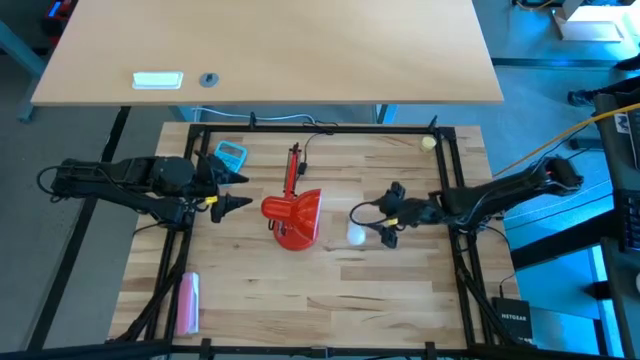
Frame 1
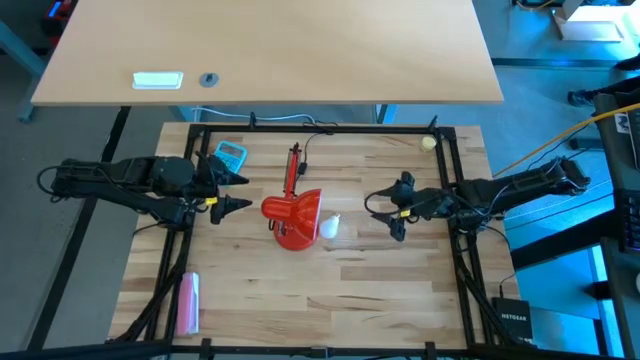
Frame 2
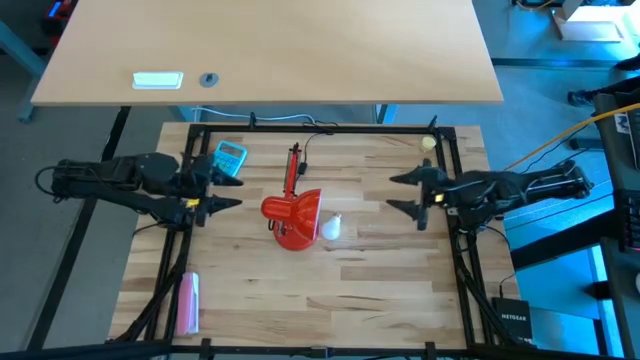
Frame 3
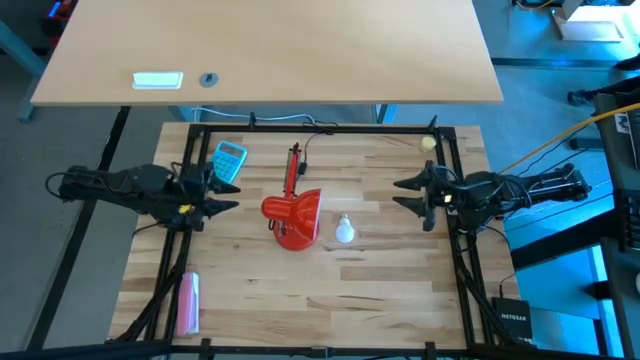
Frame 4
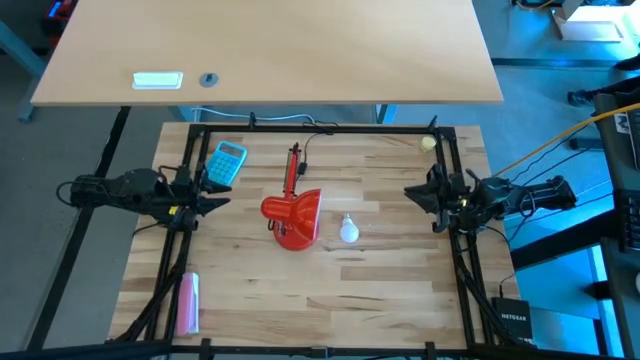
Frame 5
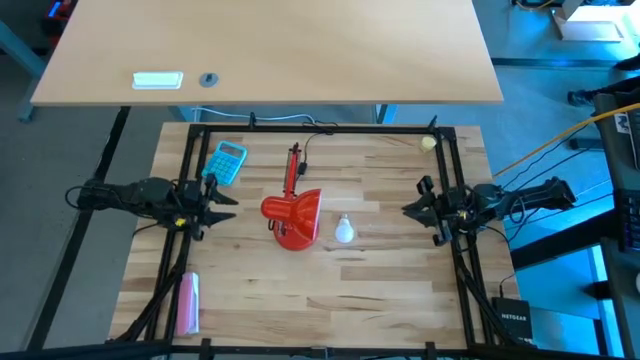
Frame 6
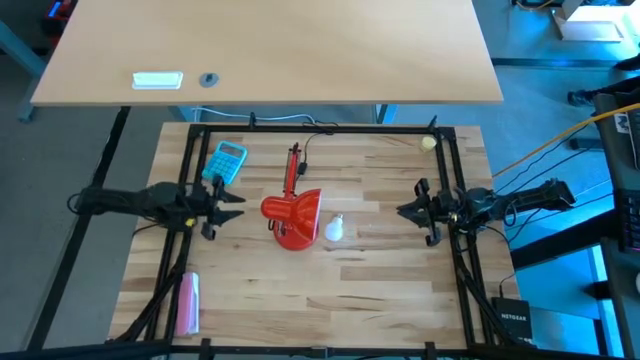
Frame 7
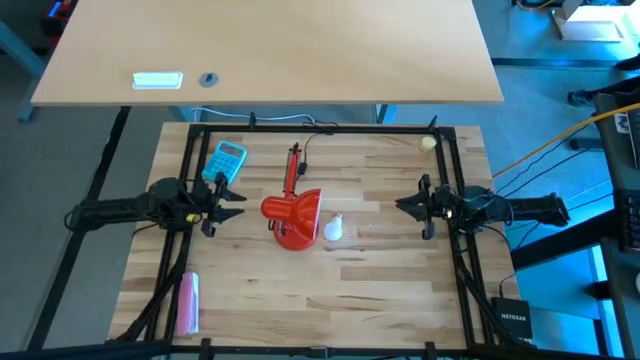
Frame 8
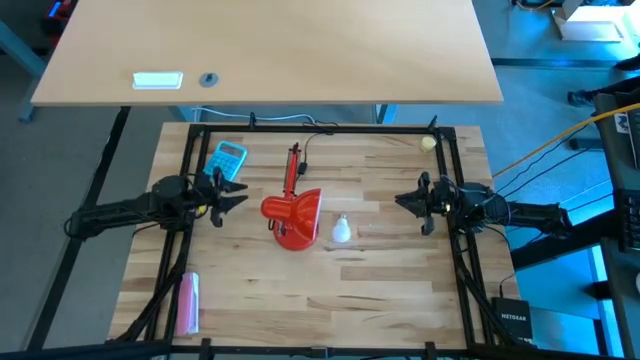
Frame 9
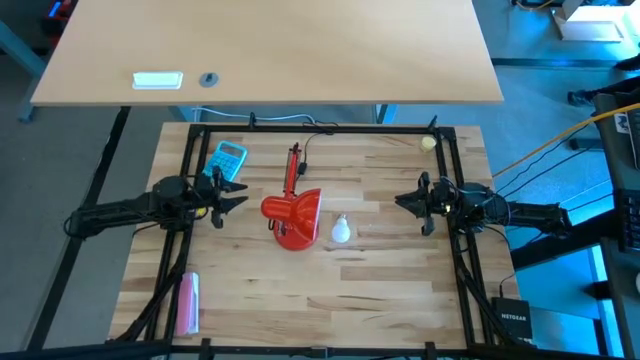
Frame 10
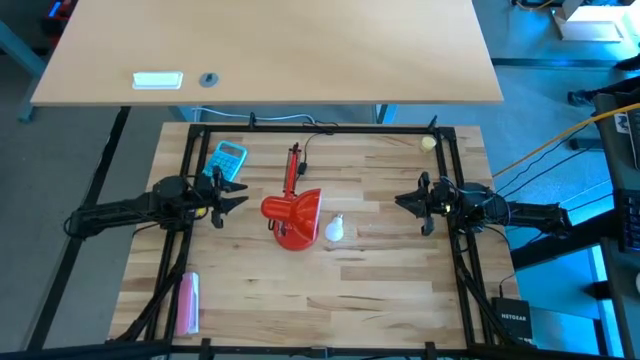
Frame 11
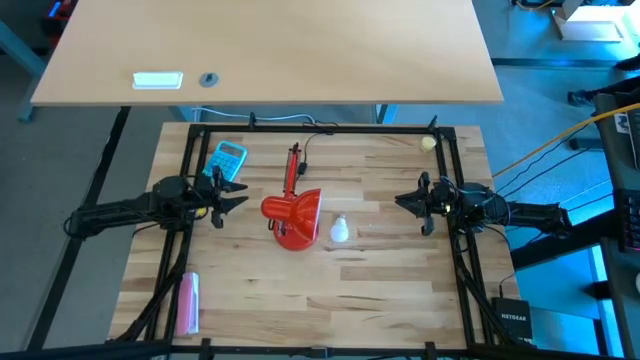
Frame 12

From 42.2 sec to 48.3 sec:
Task: Screw lightbulb
Return To Home Position

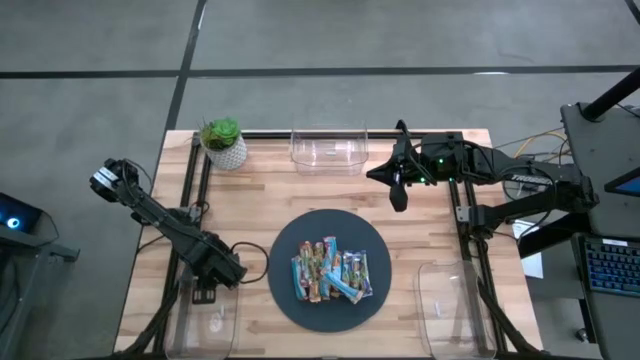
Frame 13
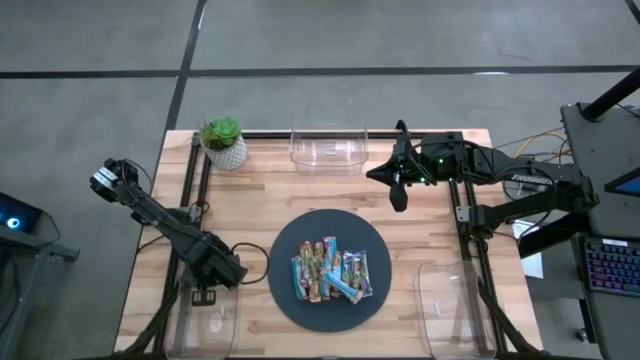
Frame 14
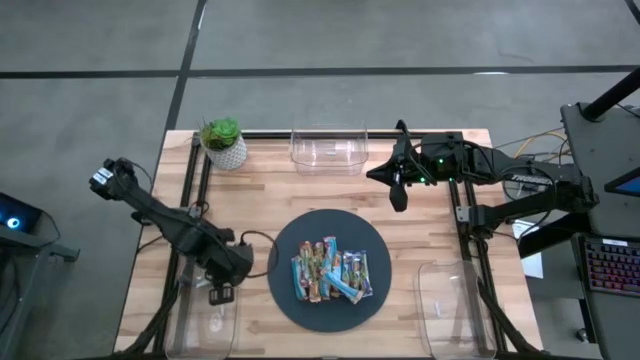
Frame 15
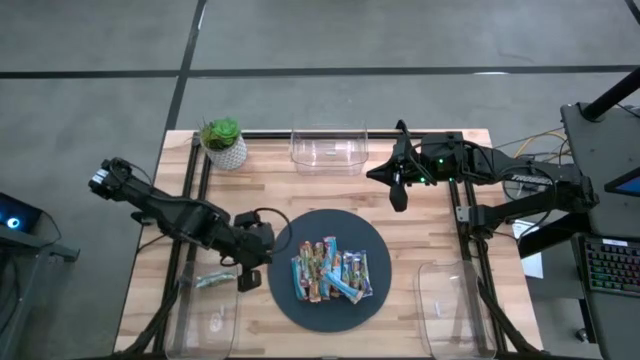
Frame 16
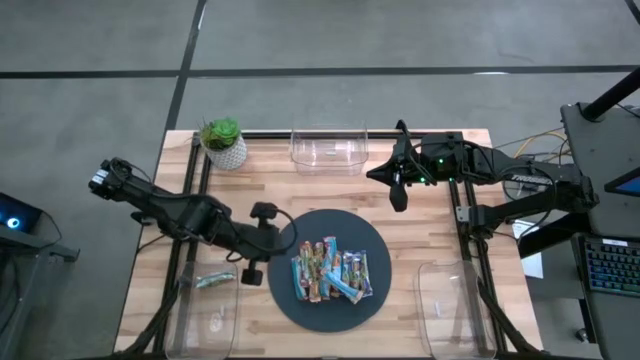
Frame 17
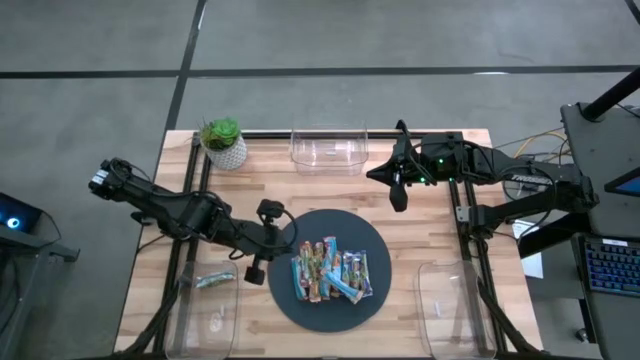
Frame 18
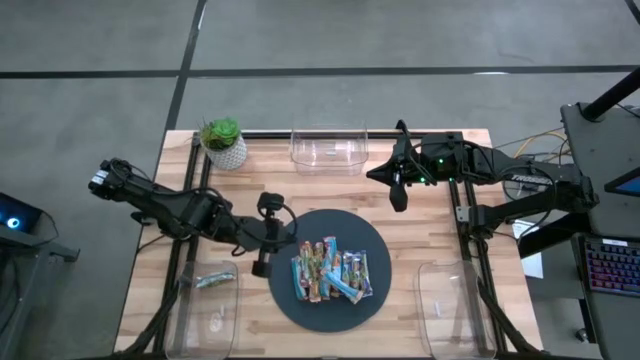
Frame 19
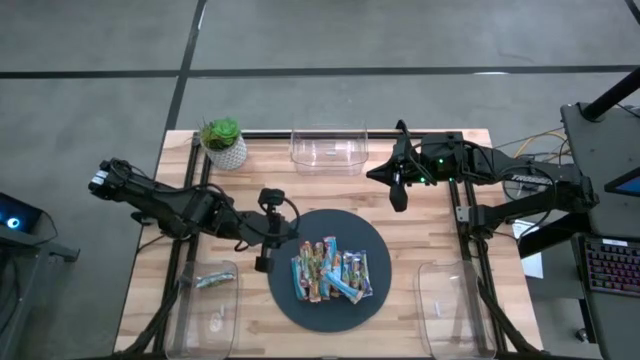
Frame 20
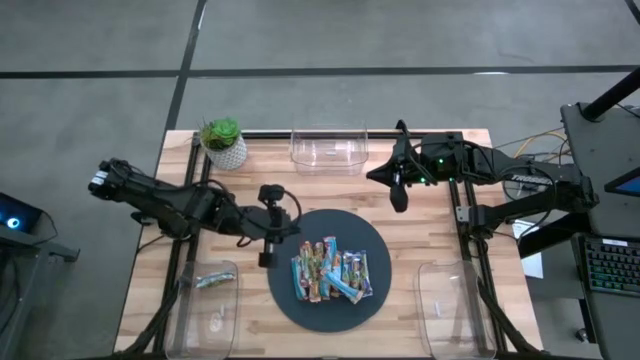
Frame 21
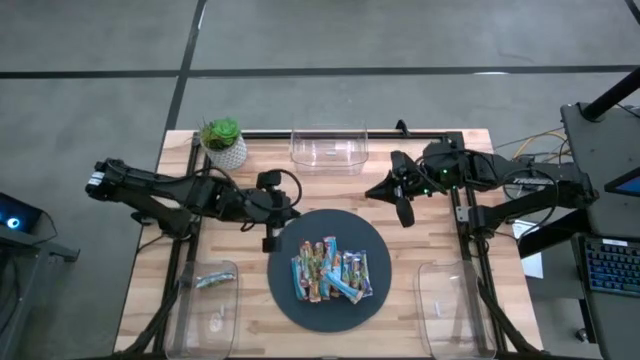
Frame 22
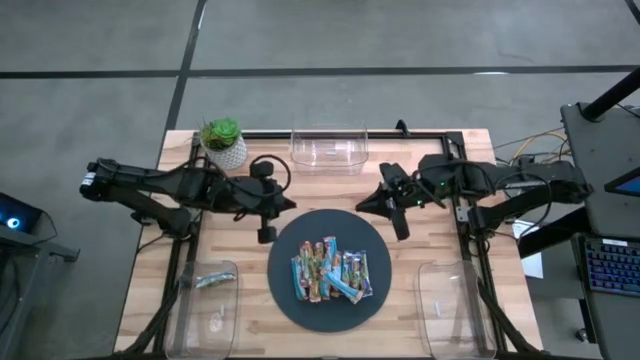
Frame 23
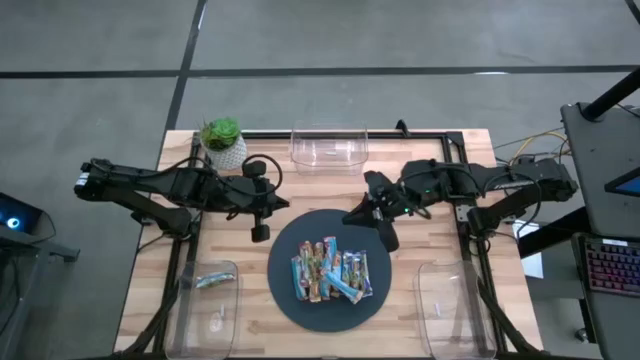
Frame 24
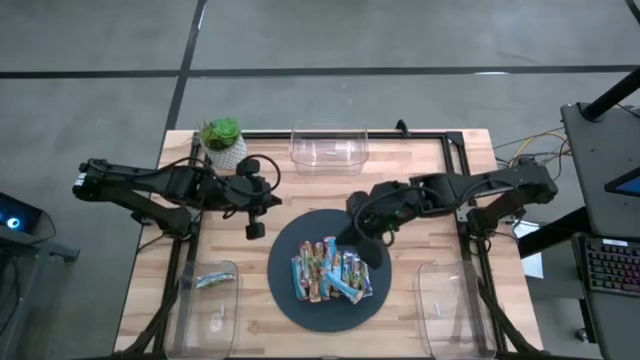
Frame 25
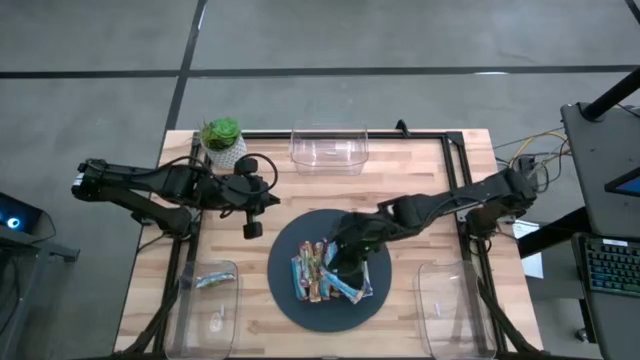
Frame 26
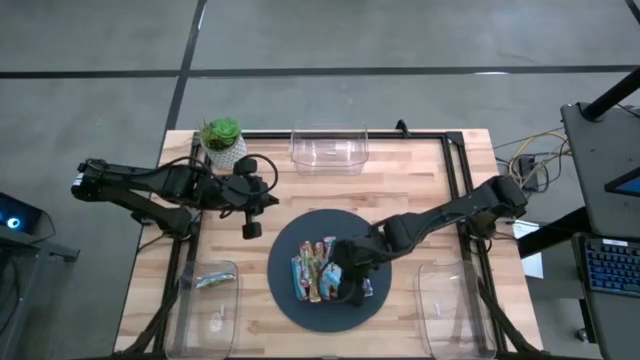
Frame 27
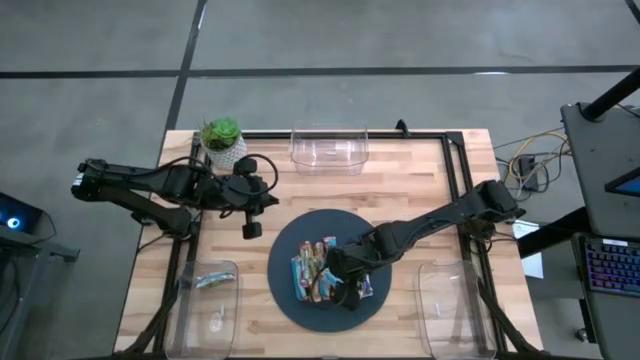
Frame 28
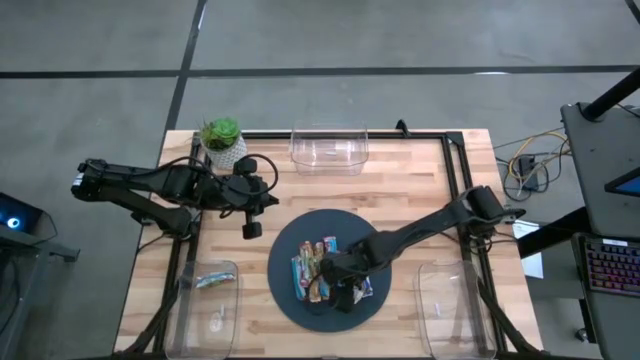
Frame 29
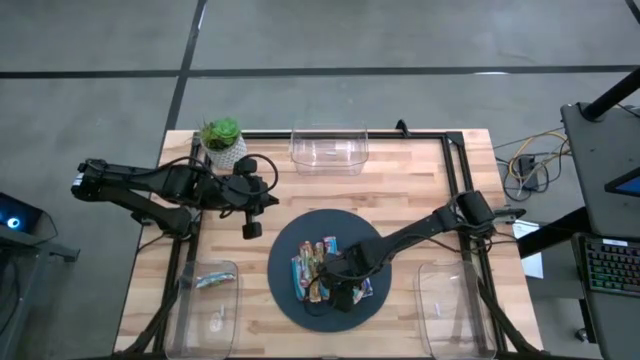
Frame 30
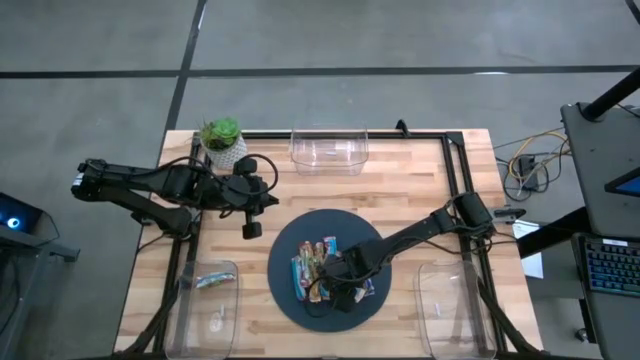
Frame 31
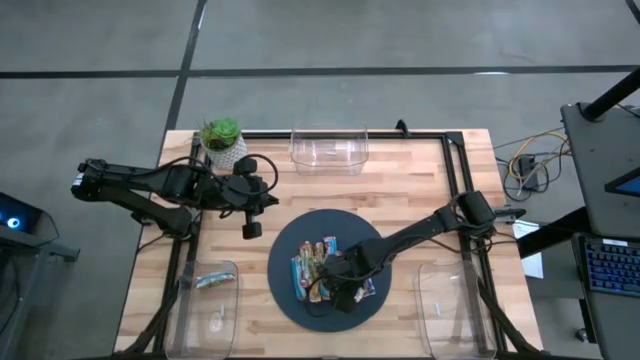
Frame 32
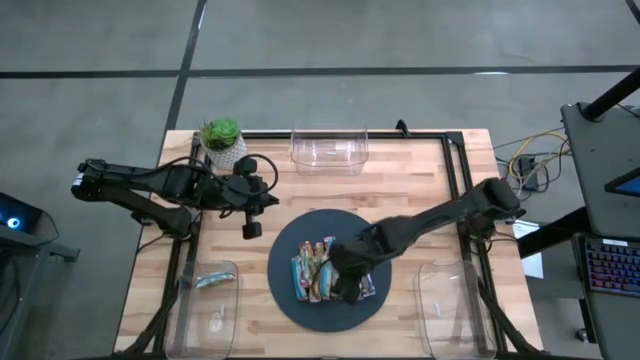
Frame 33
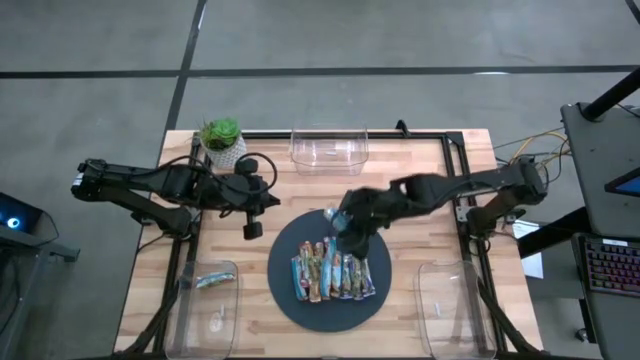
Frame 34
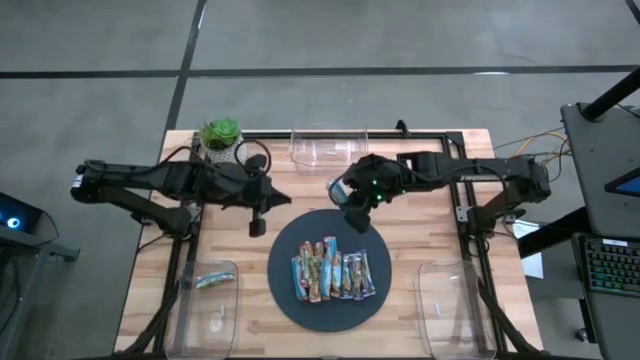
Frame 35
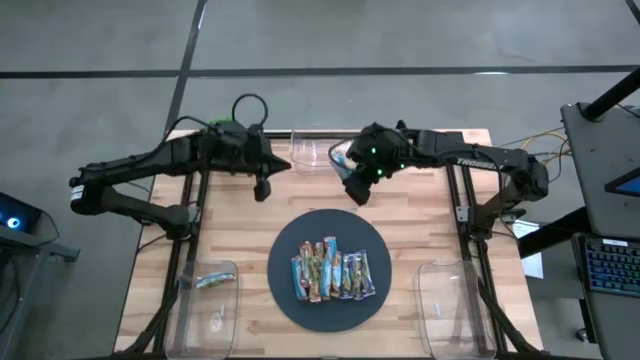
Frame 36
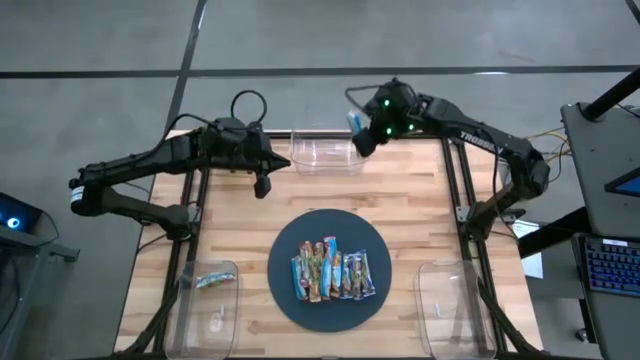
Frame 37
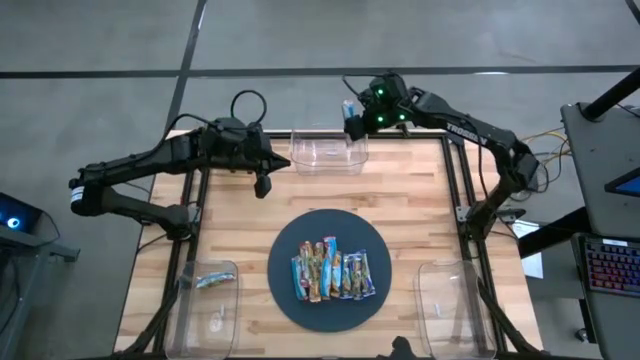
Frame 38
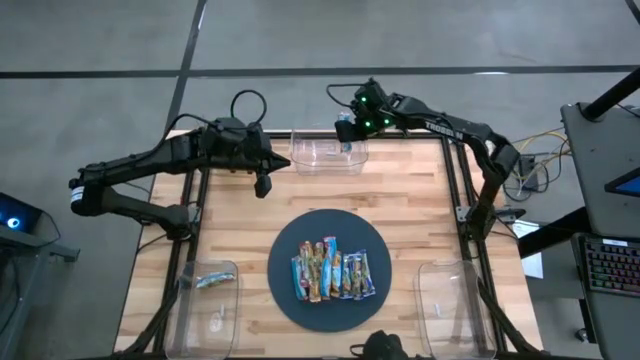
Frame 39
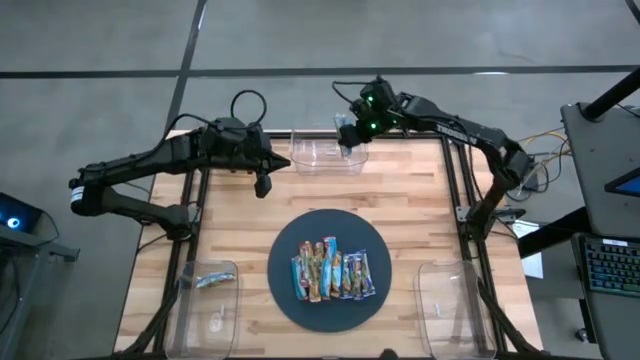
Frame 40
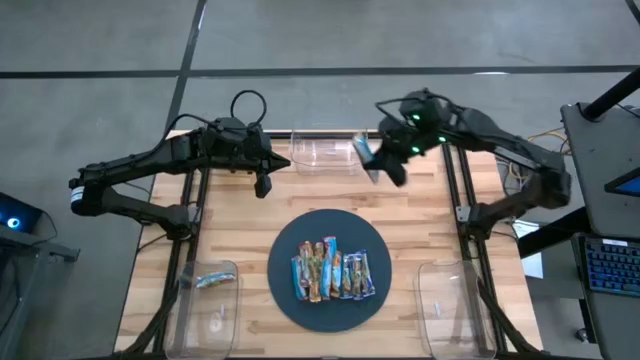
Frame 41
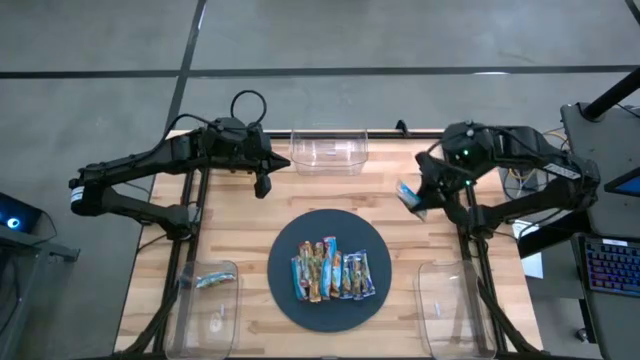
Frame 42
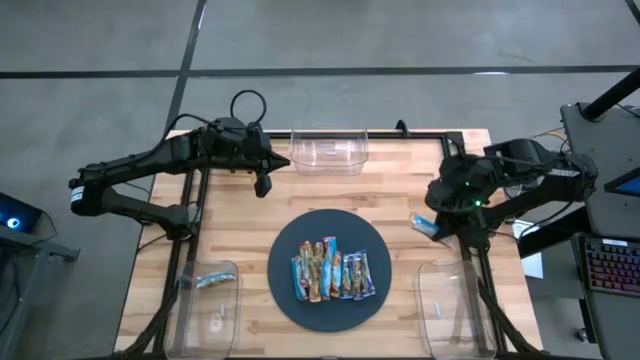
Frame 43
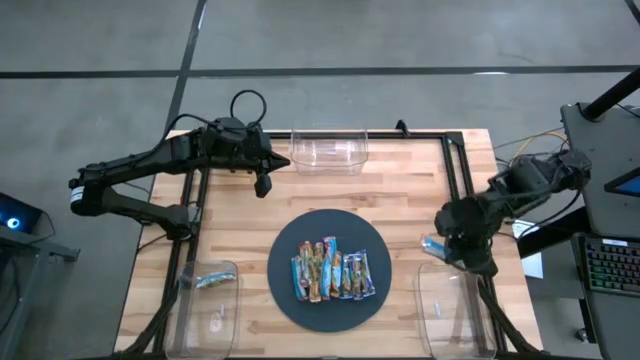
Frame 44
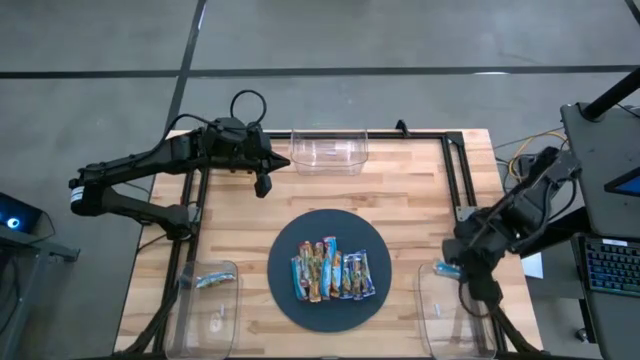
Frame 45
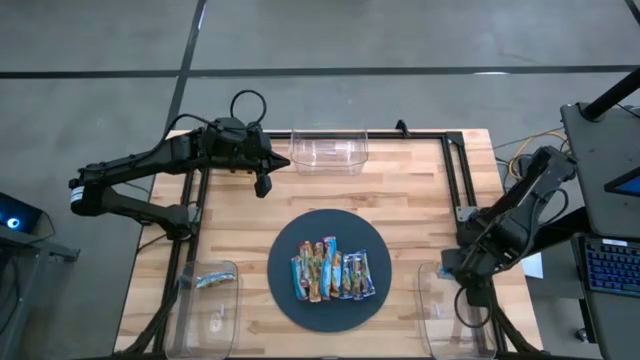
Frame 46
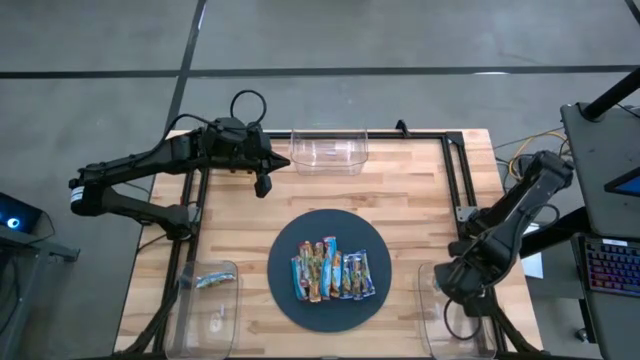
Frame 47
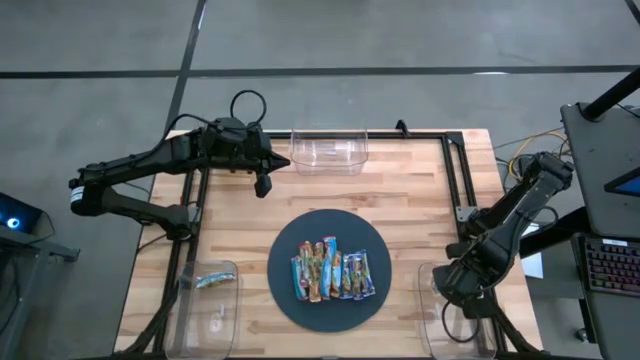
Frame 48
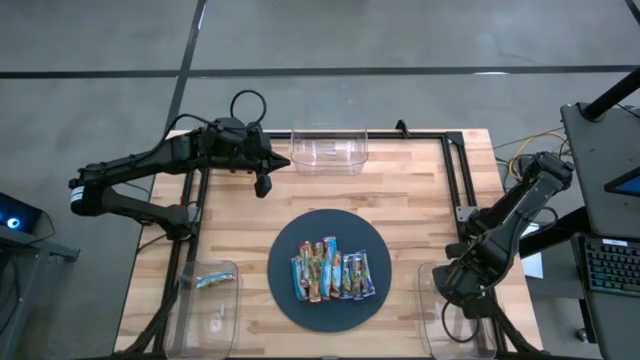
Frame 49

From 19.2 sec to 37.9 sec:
Task: Pick and place Granola Bars by type
Put the yellow granola bar into the bottom right transparent bin
